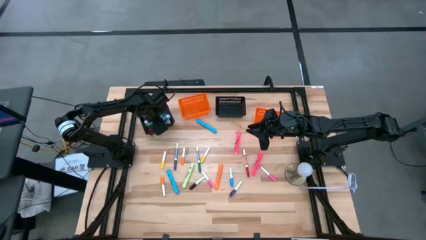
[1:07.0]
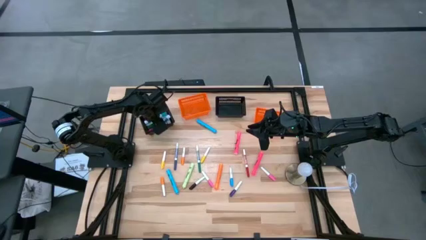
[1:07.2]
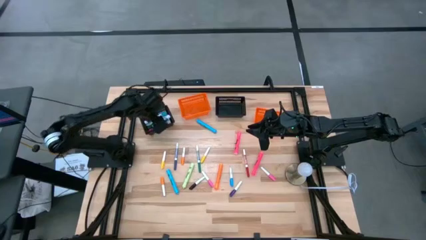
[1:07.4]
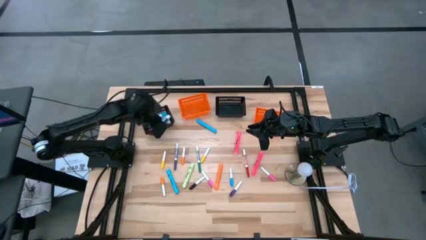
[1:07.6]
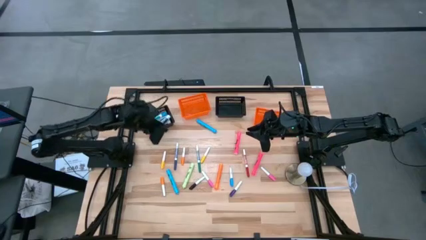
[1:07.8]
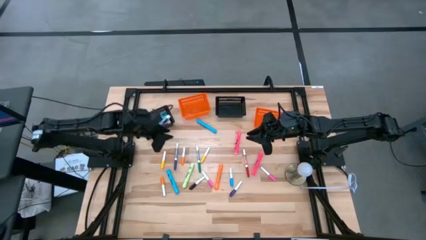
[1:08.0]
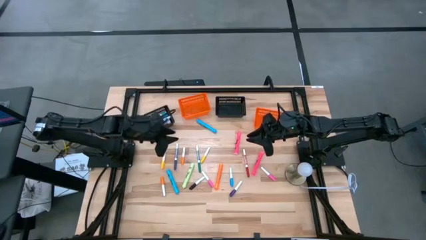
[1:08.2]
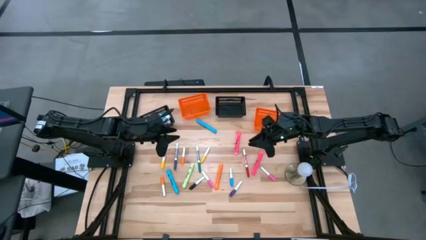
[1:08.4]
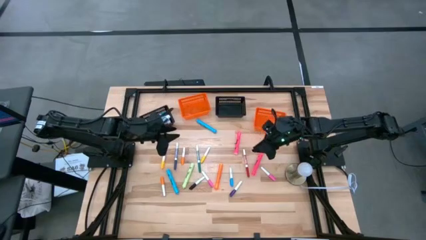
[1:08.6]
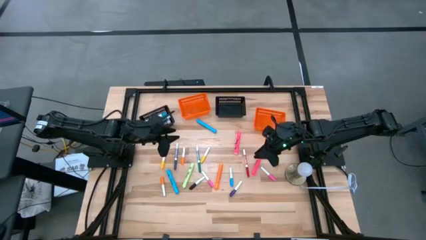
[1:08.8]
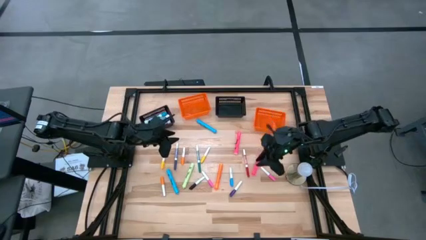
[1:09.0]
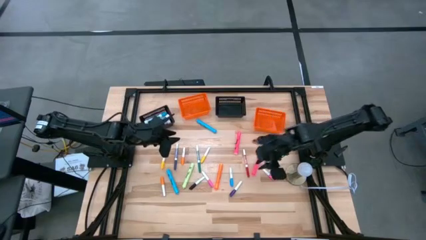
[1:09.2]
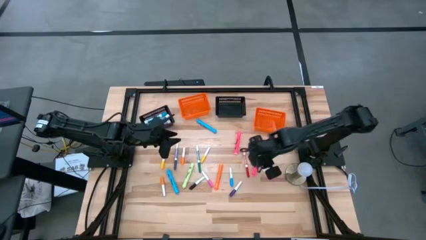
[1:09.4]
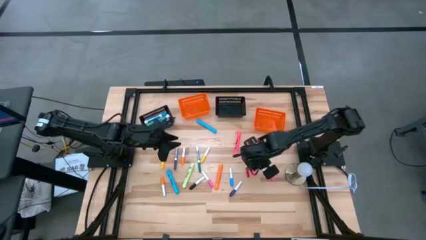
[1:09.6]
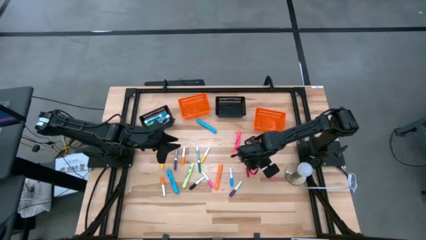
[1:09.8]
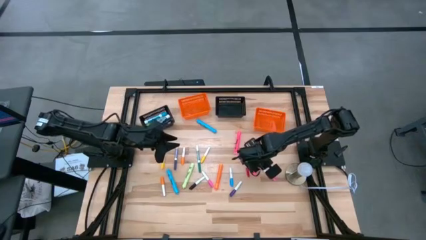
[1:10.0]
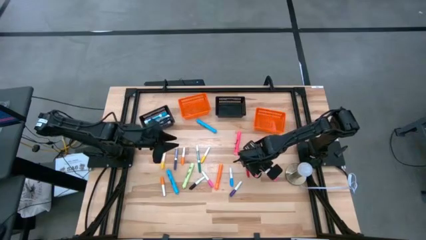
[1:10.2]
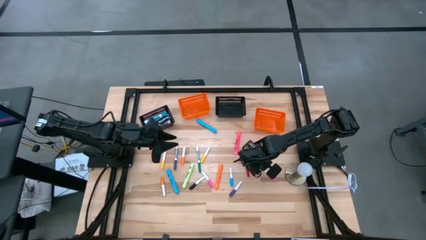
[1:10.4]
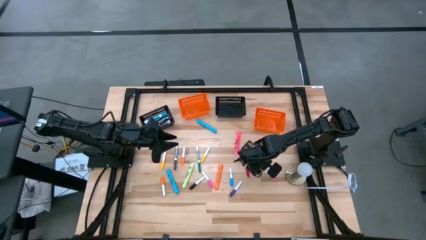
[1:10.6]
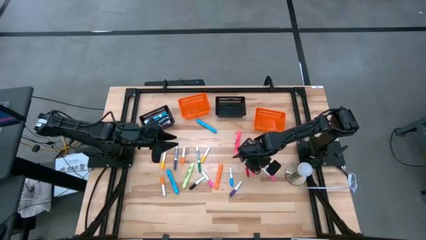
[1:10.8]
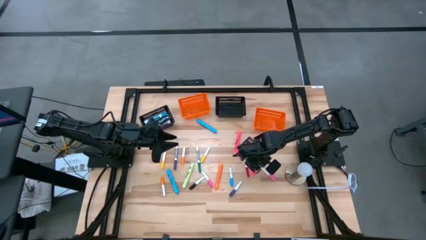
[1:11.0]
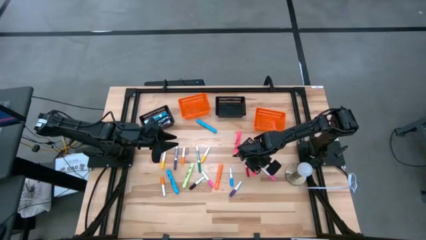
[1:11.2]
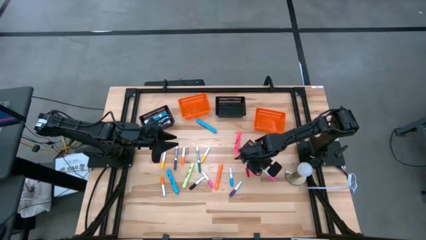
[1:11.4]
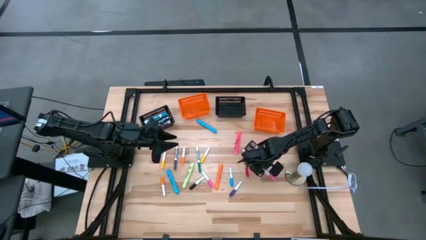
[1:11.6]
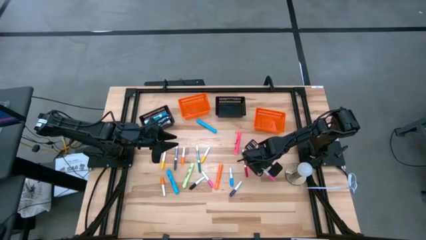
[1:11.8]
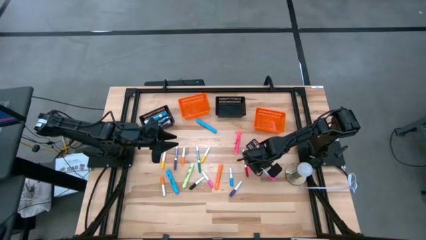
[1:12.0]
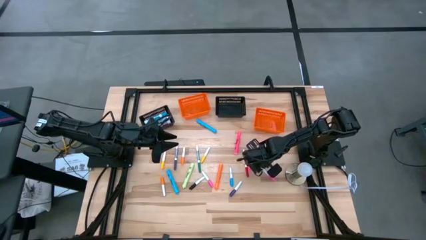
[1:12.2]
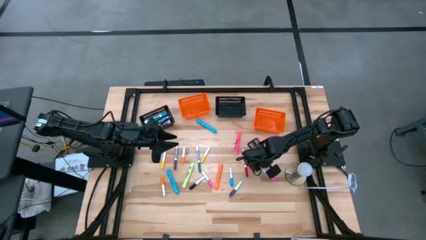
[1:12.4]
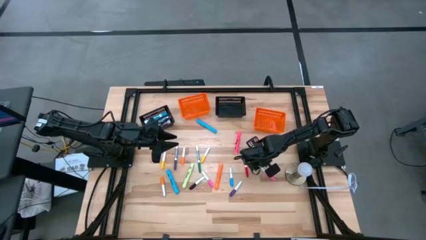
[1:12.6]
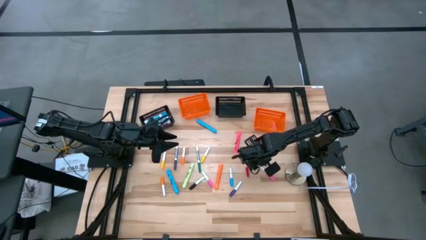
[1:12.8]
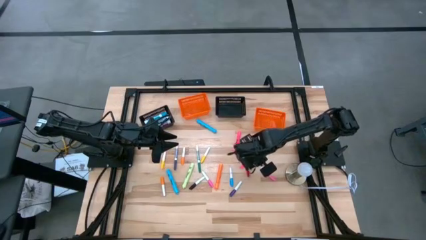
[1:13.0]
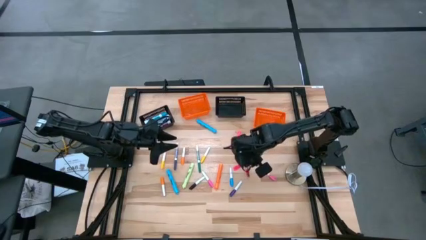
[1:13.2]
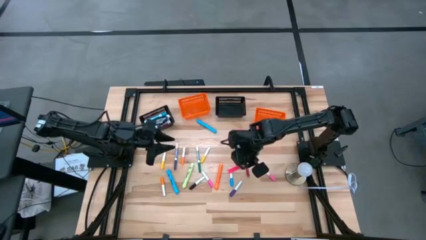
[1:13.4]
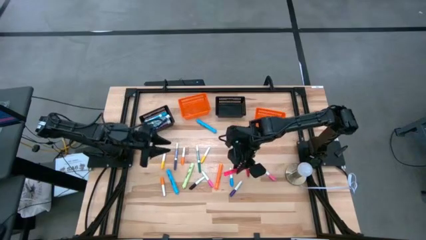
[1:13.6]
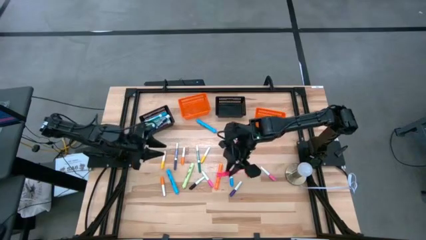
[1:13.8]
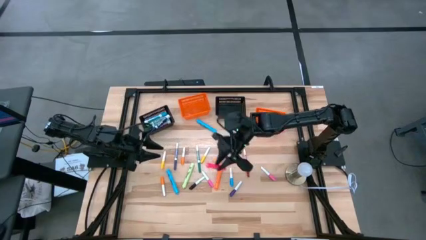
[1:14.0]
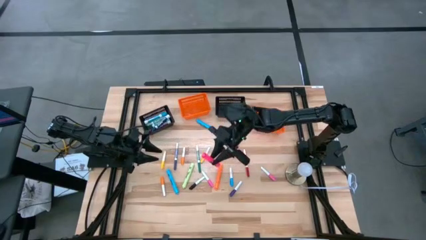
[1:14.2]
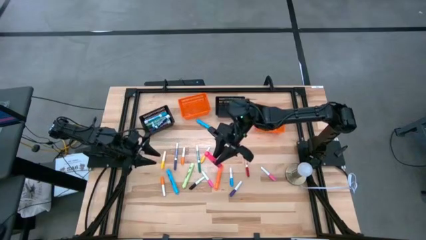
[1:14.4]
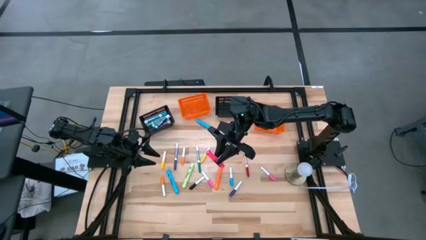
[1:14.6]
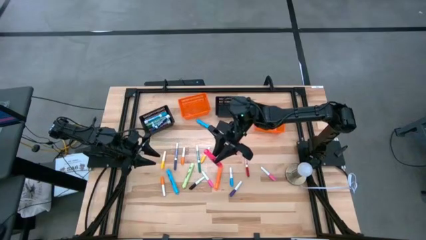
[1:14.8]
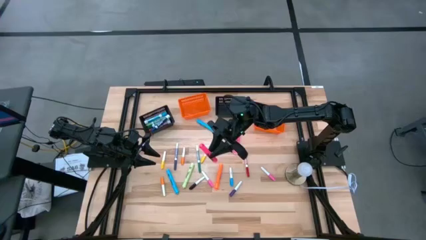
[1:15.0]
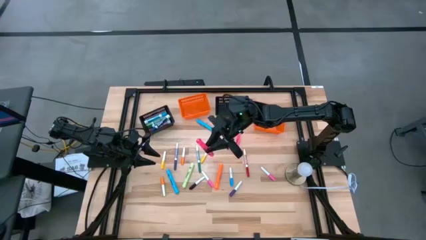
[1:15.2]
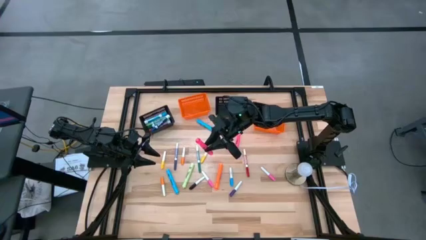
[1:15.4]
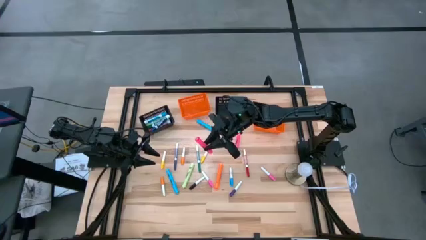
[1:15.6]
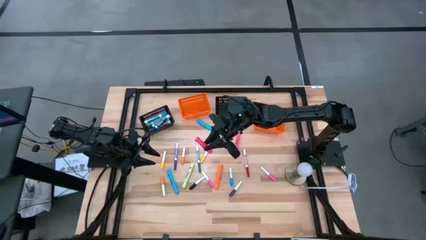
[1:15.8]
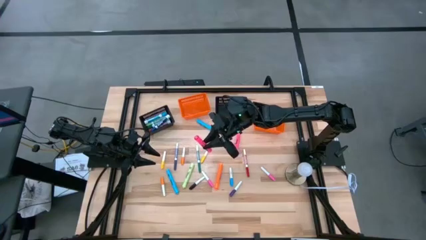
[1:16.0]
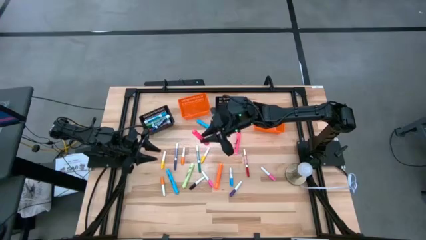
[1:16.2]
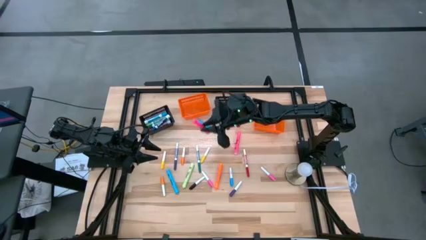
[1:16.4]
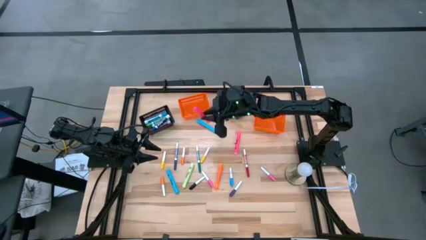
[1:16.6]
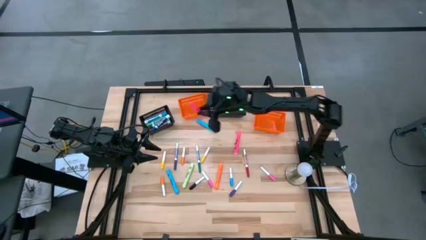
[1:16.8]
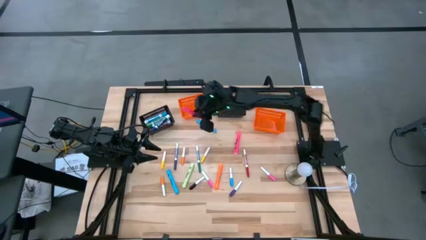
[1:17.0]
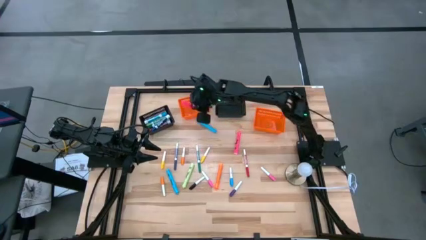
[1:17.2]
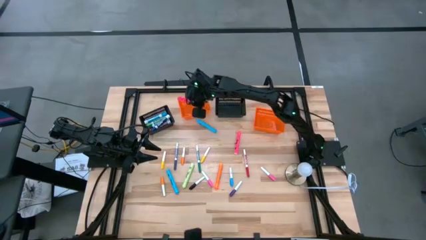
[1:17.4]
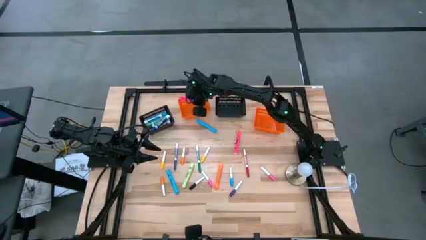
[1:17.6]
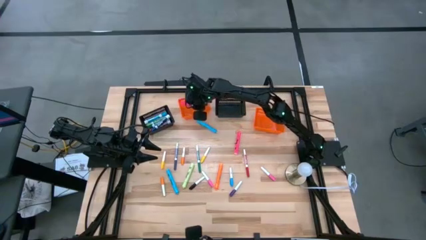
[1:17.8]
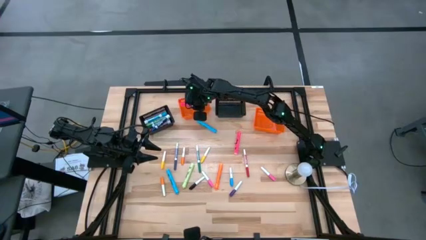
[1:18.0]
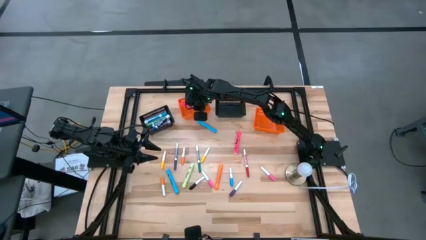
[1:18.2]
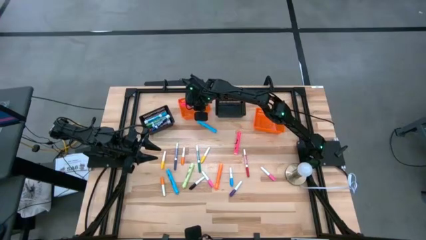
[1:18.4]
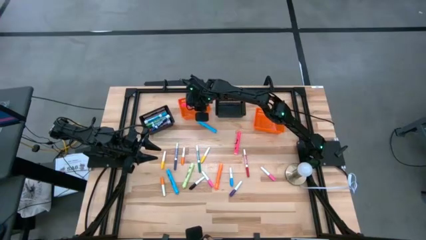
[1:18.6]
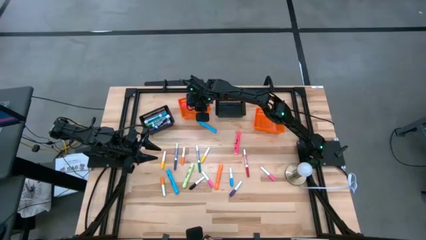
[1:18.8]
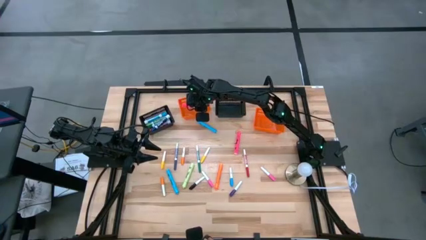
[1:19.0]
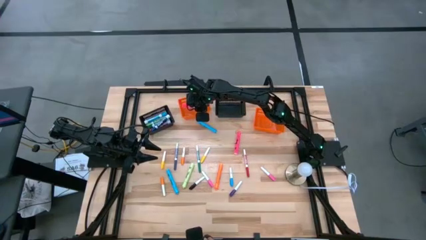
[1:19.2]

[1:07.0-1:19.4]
Task: Pick & Place Markers
Put the bottom large pink highlighter pen into the left orange bin

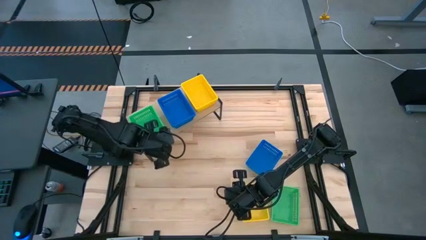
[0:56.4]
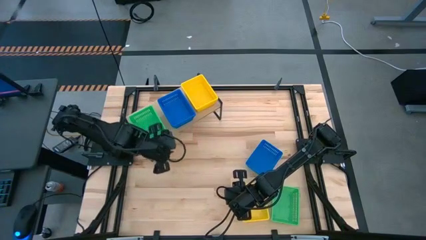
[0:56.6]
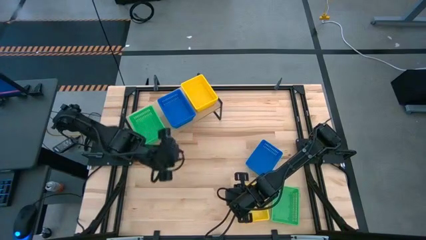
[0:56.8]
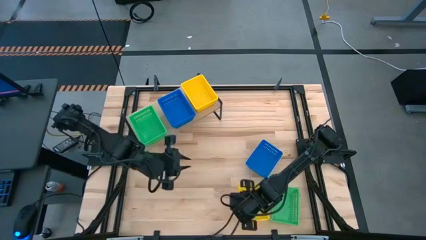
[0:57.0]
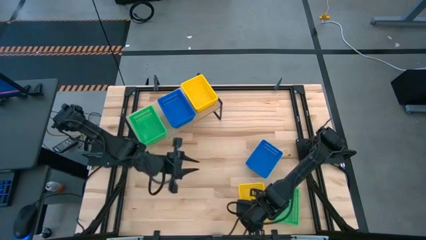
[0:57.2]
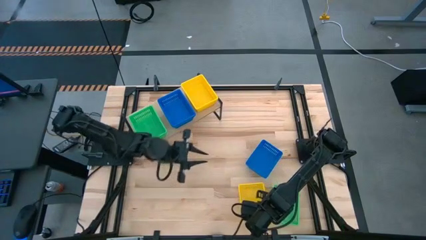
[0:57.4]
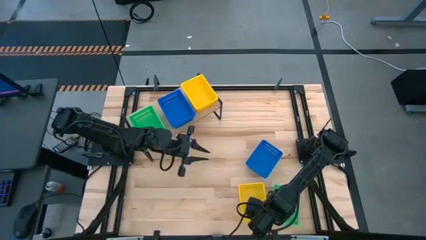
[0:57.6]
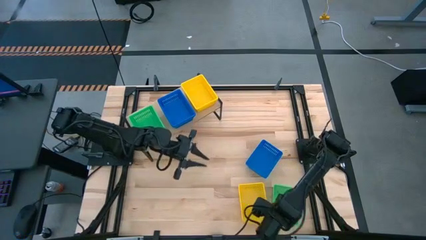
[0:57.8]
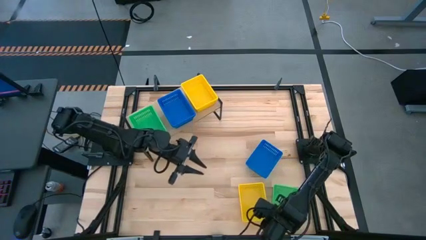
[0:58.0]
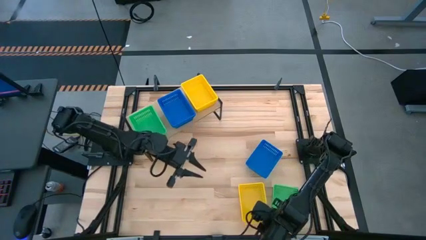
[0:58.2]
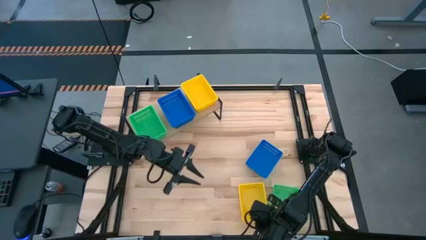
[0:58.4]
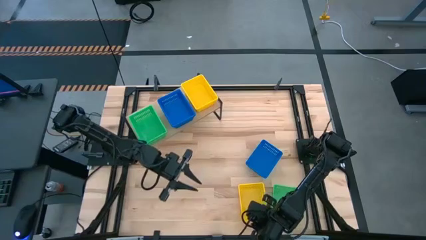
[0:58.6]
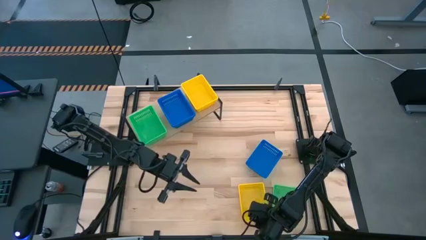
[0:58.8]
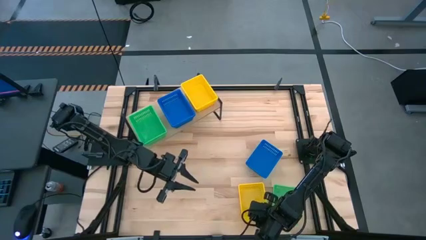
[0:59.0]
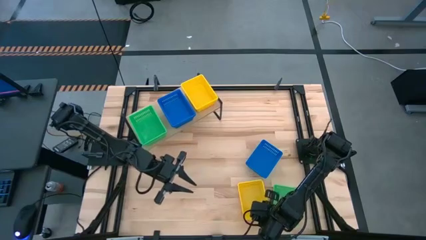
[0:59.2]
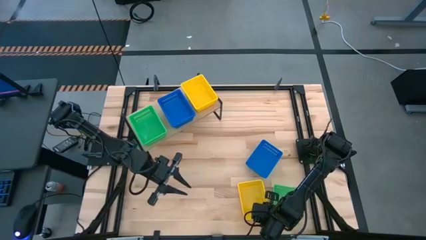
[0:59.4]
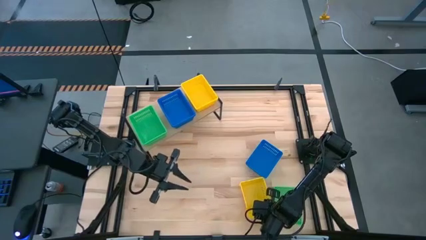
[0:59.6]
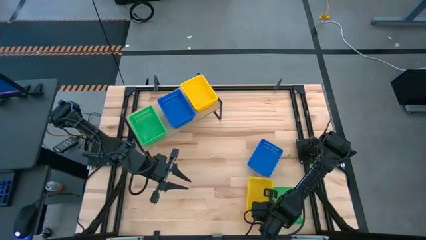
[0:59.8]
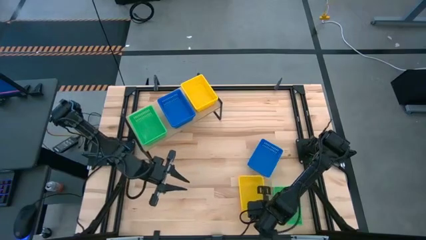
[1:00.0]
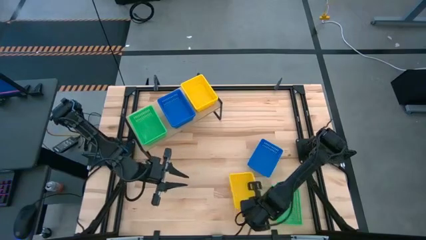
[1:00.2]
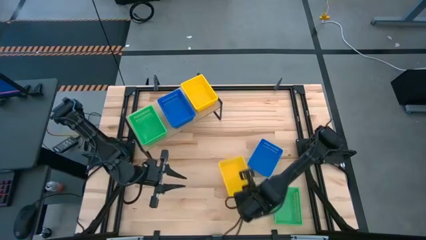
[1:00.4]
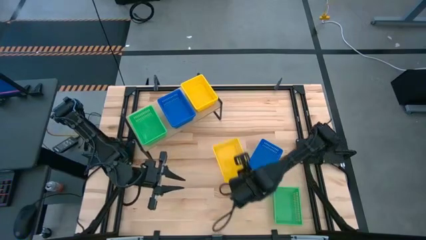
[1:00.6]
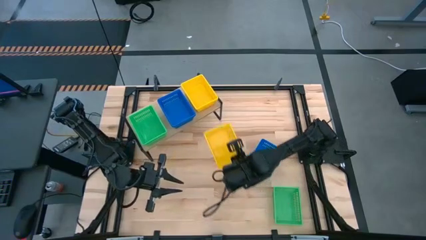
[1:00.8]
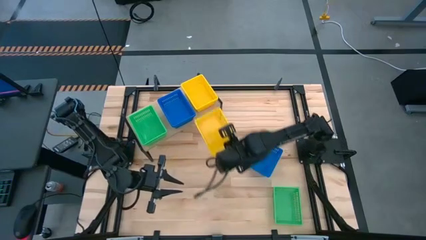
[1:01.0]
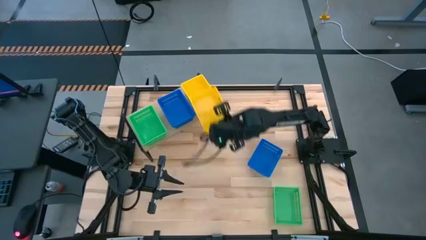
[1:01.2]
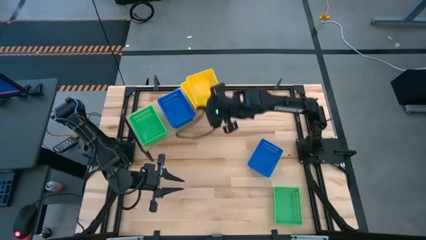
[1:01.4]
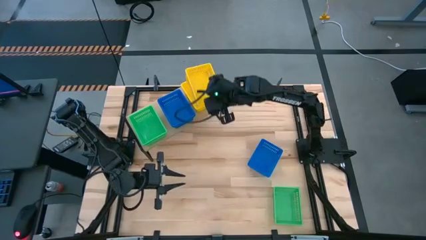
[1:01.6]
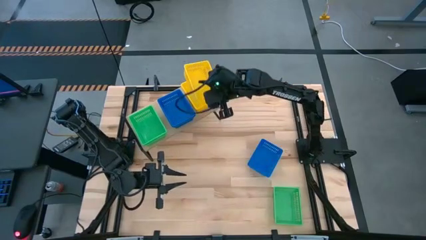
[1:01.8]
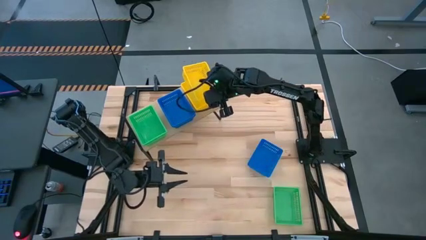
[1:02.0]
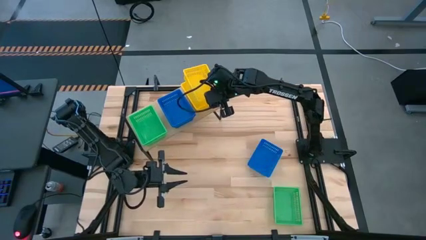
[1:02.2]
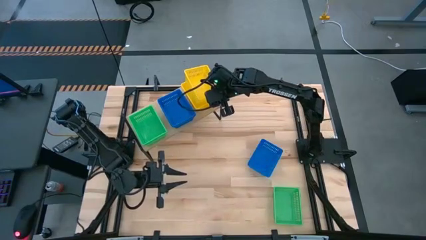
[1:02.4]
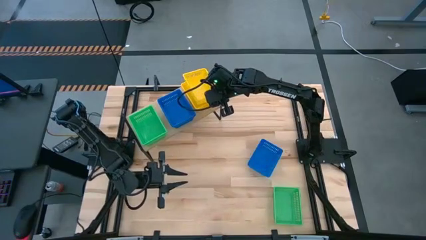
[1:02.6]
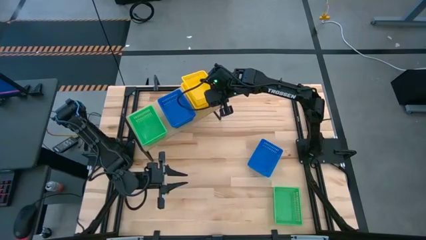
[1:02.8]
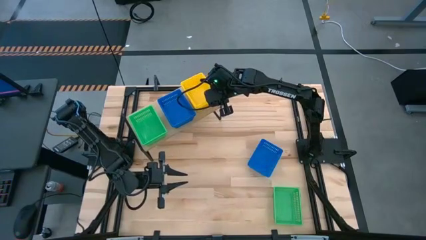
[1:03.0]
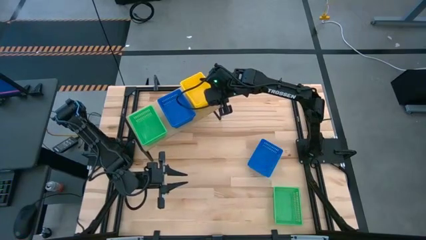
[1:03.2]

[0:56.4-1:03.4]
Task: Stack baskets on shelf by color
Stack the yellow basket on top of the yellow baskets on the shelf
